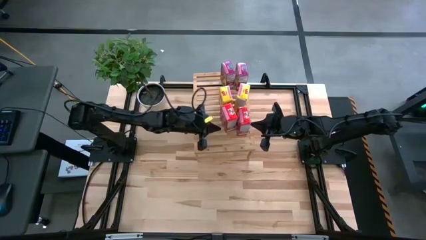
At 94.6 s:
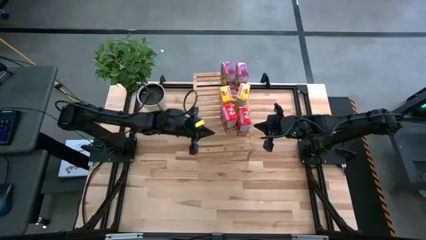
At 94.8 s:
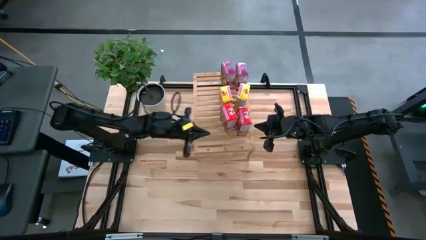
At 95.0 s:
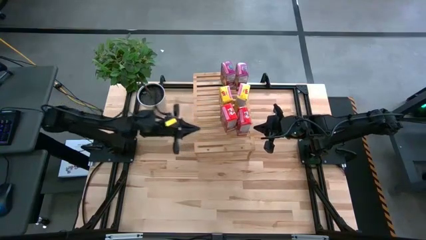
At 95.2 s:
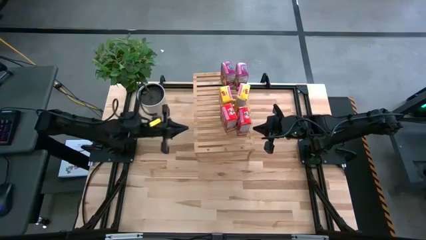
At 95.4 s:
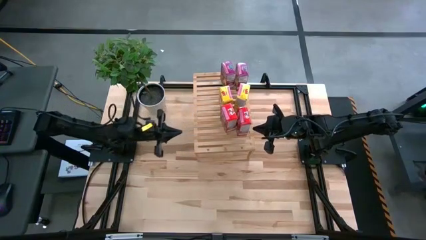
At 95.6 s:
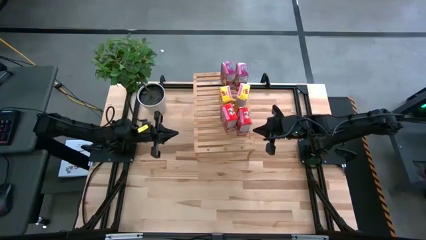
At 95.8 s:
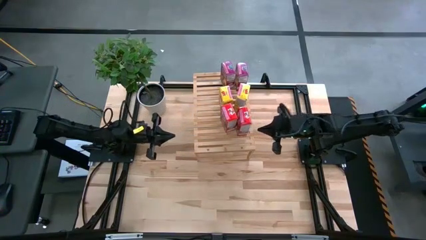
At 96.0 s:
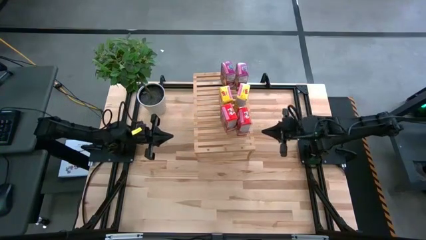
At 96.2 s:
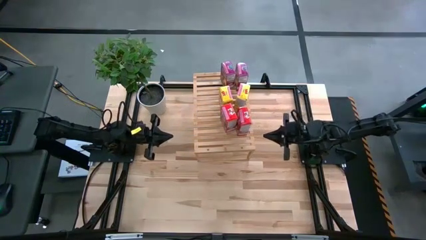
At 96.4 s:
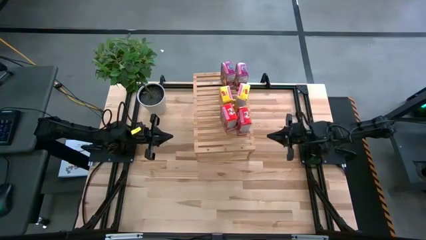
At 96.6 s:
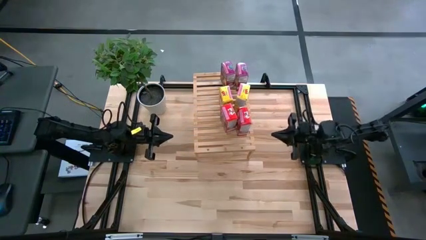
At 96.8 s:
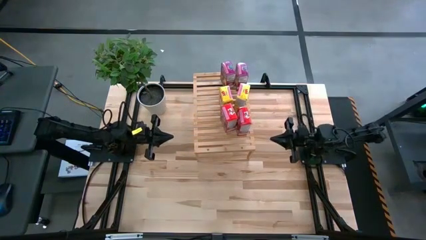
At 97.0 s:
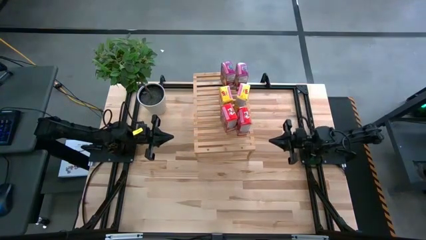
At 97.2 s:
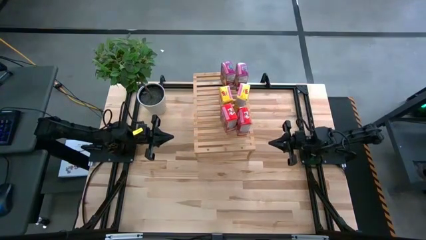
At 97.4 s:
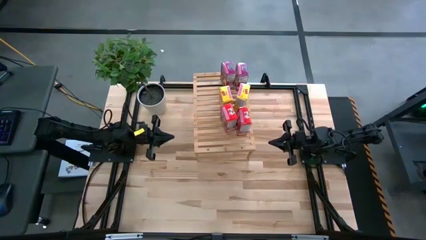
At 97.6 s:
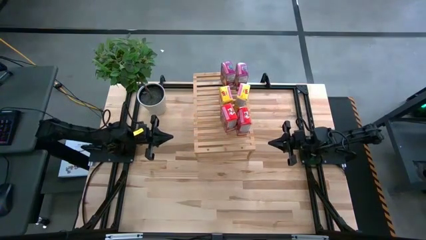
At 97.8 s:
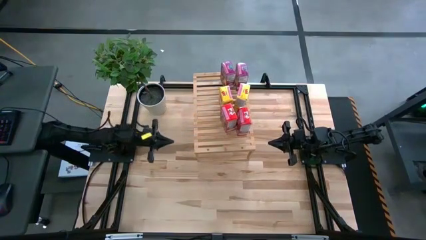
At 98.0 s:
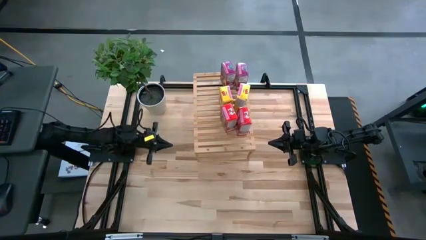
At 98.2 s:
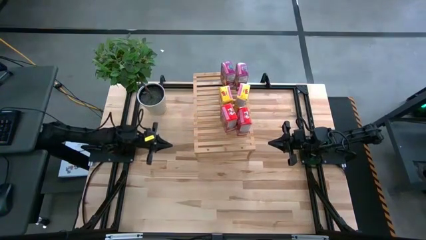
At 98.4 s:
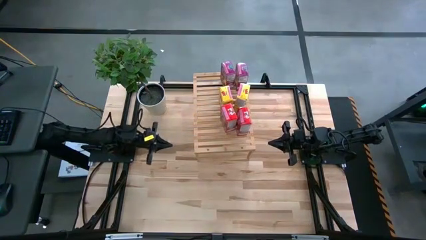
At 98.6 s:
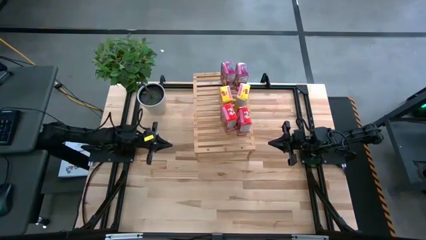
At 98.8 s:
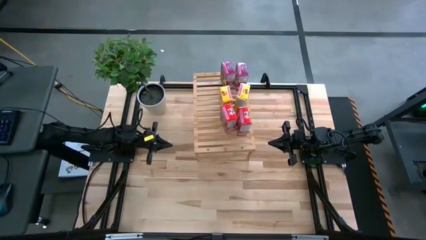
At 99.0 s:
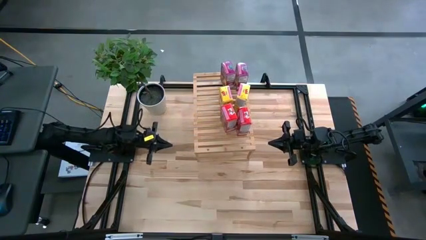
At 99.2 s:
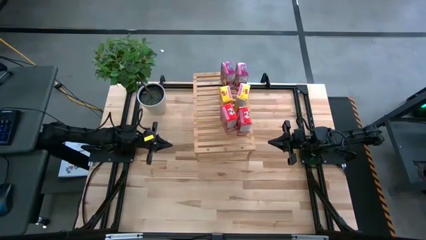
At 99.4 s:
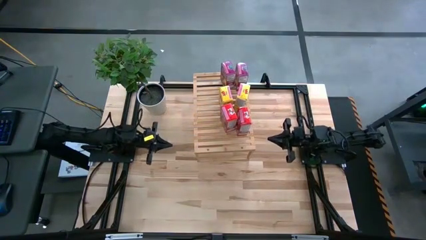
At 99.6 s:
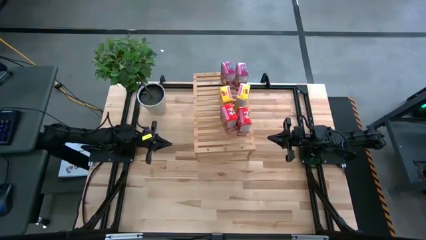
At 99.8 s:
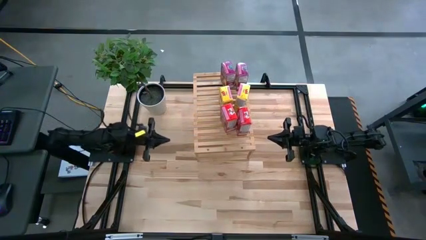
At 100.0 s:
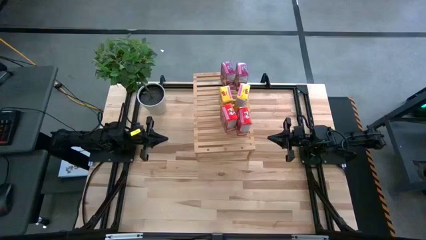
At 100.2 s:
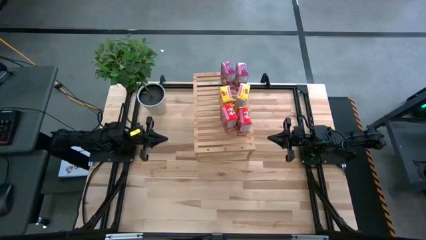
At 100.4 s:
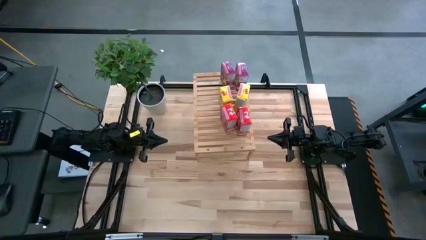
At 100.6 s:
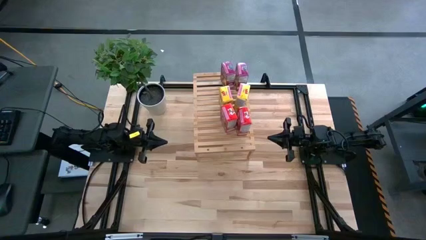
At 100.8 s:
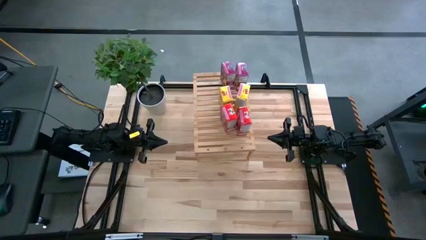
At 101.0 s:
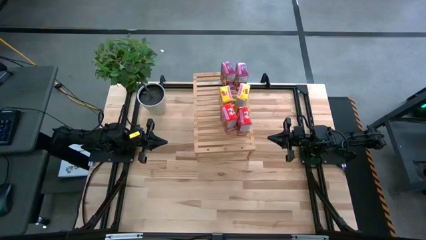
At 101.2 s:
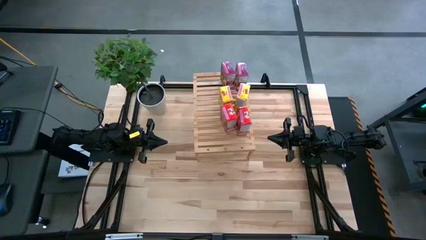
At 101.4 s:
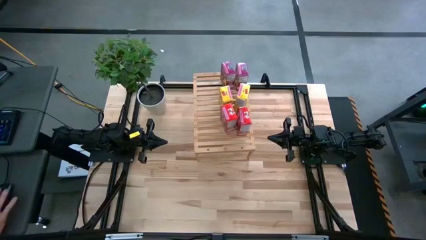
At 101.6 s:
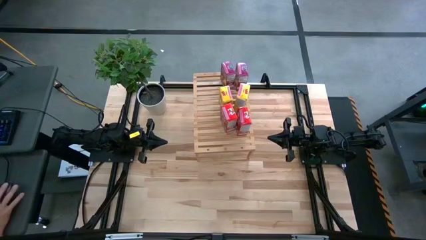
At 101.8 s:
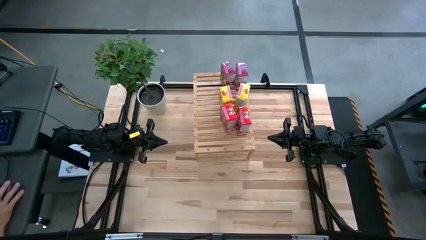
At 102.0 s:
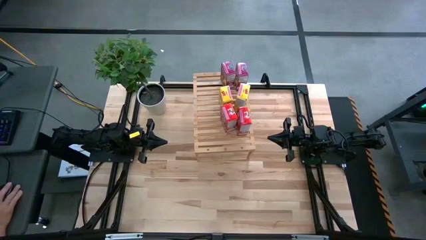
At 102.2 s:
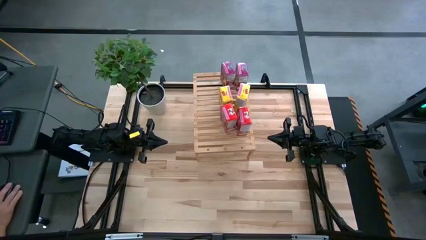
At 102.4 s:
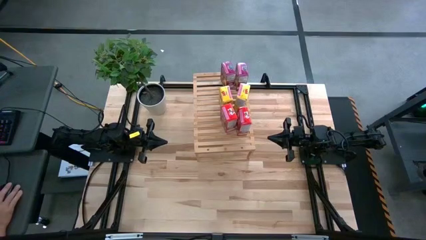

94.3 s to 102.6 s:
Task: Stack cereal on shelf
Return to Home Position

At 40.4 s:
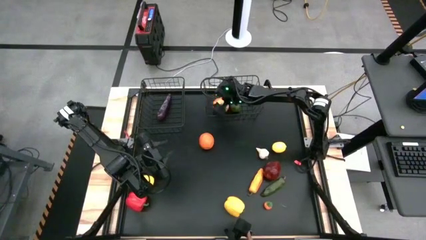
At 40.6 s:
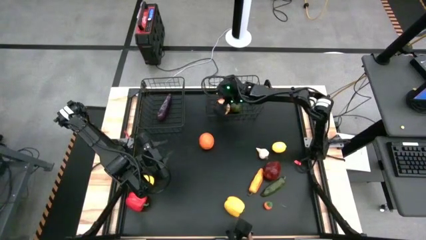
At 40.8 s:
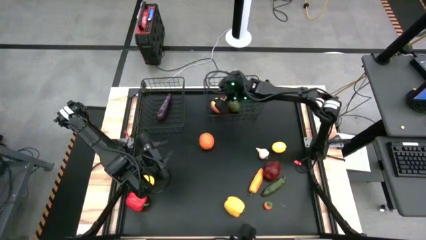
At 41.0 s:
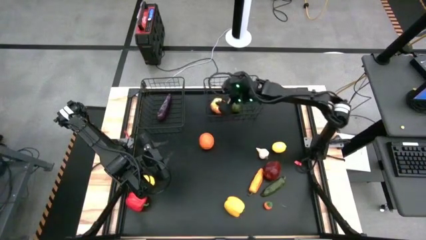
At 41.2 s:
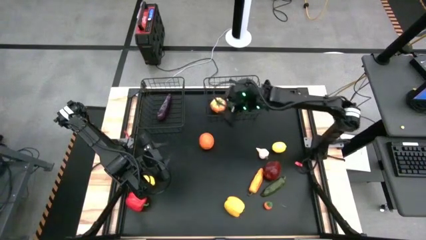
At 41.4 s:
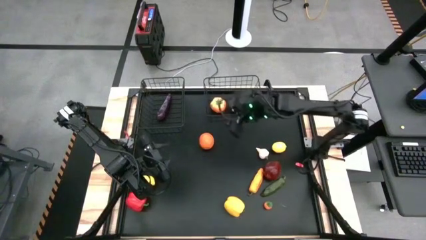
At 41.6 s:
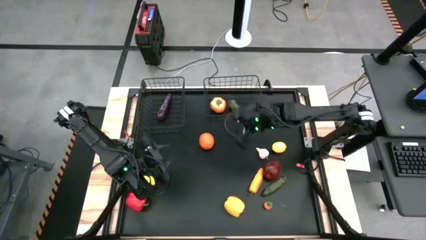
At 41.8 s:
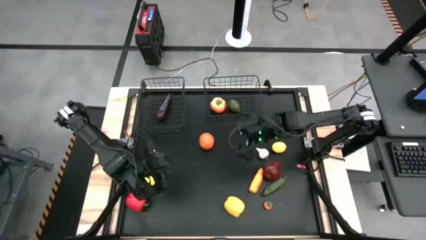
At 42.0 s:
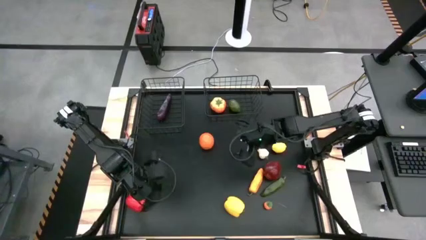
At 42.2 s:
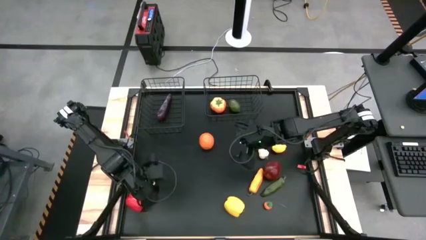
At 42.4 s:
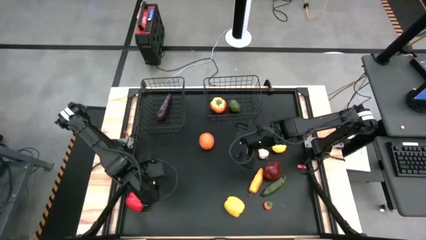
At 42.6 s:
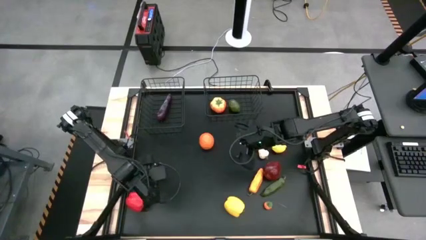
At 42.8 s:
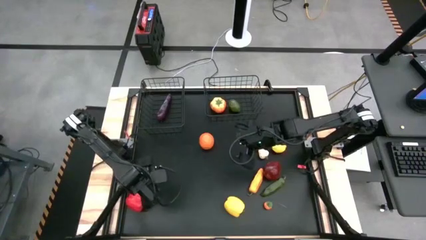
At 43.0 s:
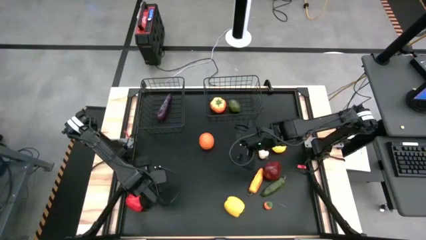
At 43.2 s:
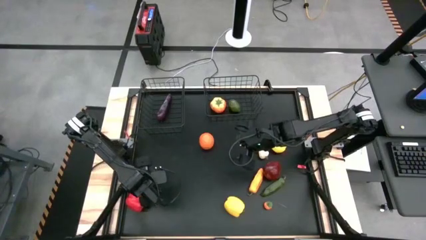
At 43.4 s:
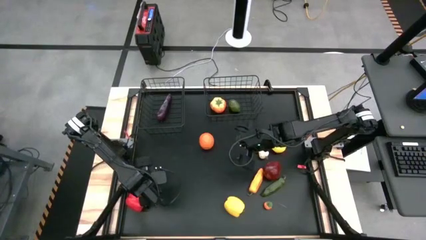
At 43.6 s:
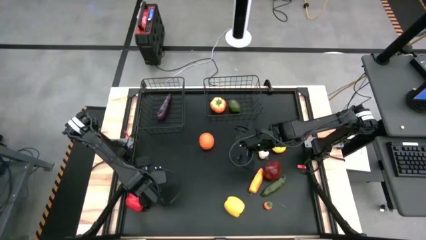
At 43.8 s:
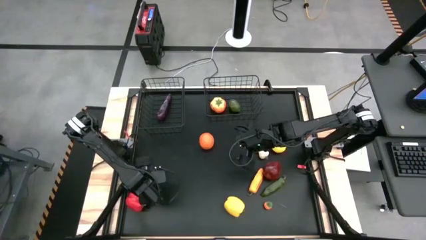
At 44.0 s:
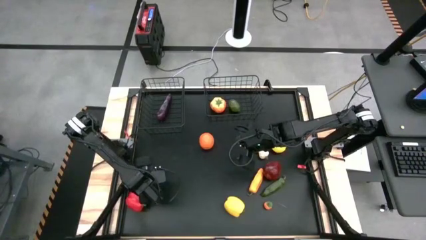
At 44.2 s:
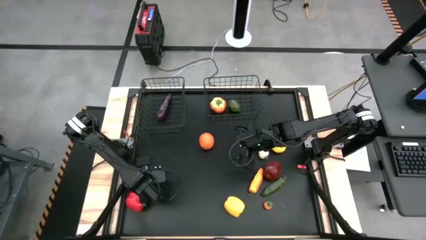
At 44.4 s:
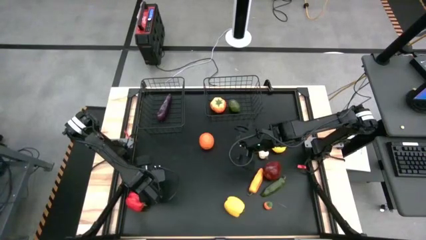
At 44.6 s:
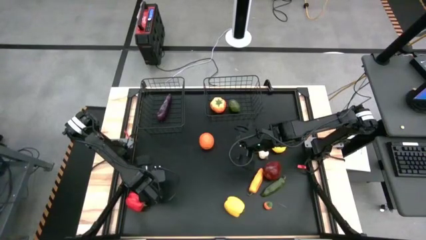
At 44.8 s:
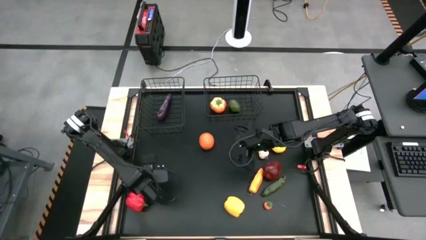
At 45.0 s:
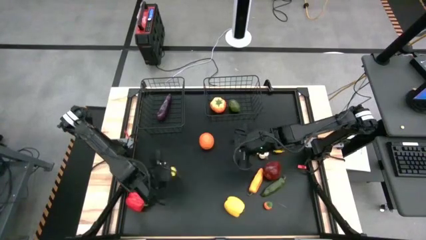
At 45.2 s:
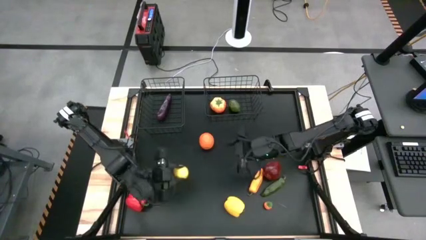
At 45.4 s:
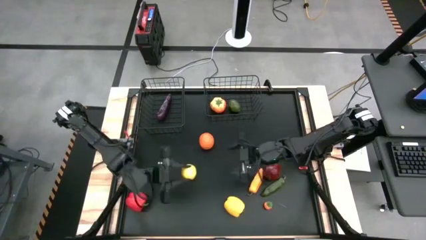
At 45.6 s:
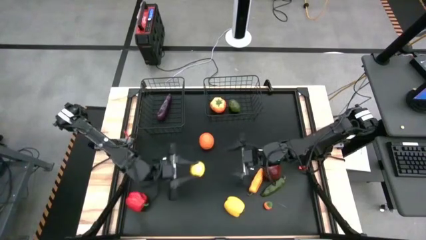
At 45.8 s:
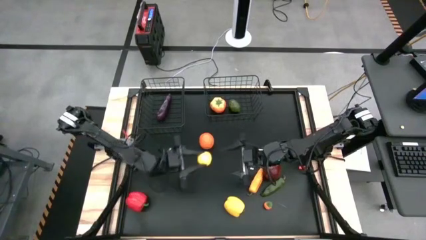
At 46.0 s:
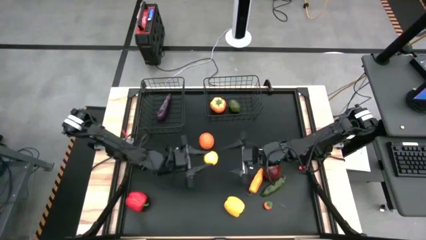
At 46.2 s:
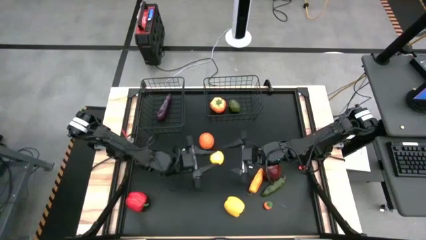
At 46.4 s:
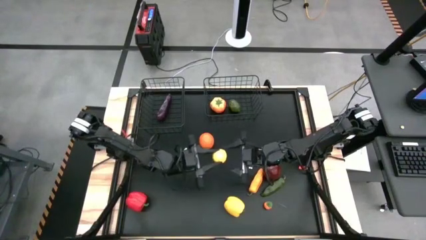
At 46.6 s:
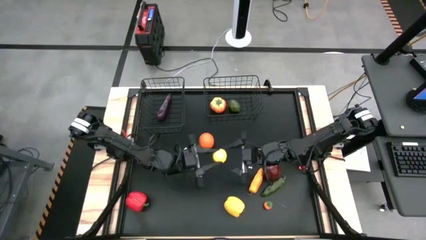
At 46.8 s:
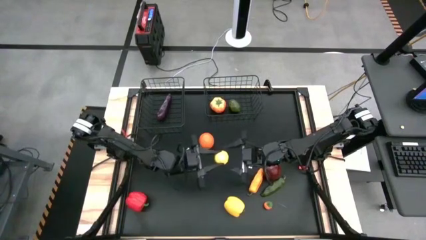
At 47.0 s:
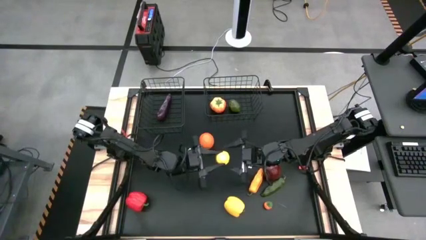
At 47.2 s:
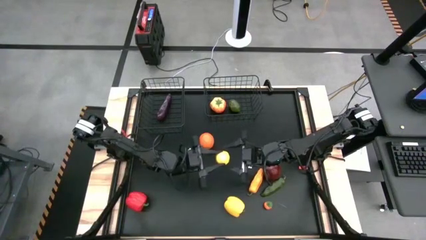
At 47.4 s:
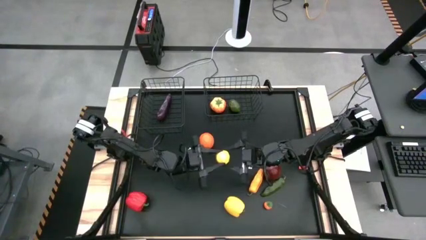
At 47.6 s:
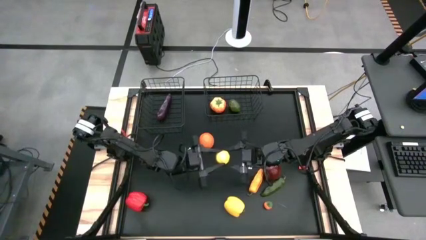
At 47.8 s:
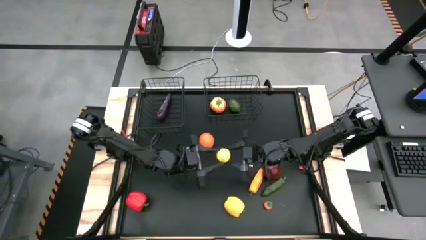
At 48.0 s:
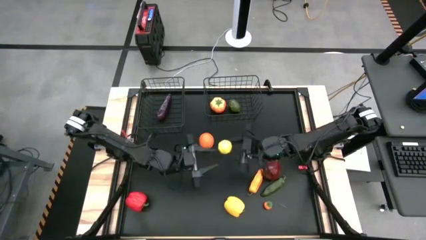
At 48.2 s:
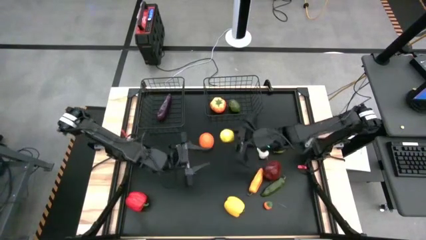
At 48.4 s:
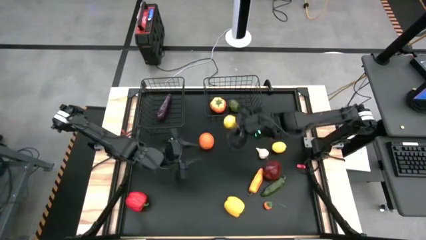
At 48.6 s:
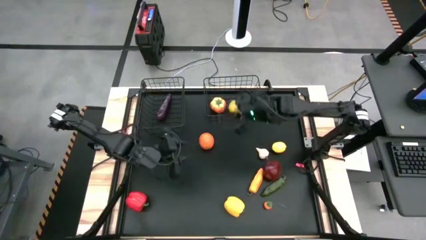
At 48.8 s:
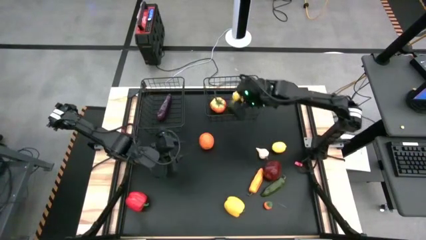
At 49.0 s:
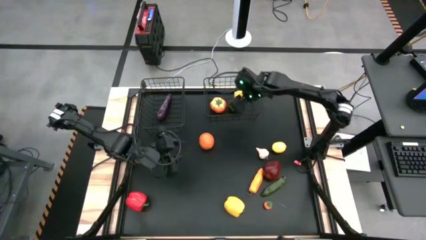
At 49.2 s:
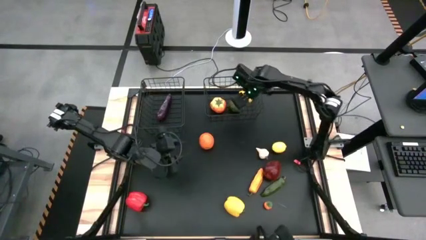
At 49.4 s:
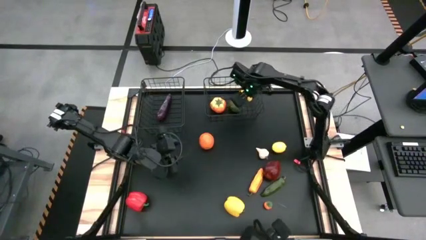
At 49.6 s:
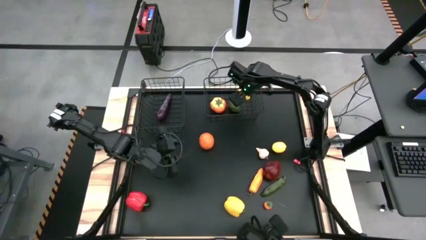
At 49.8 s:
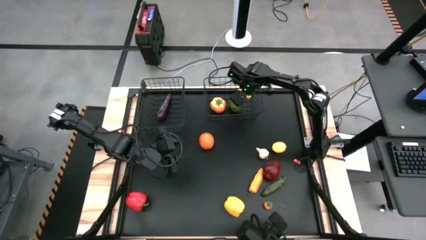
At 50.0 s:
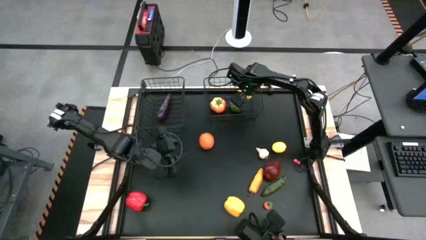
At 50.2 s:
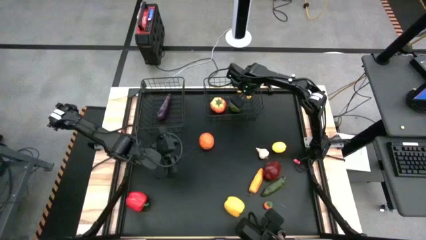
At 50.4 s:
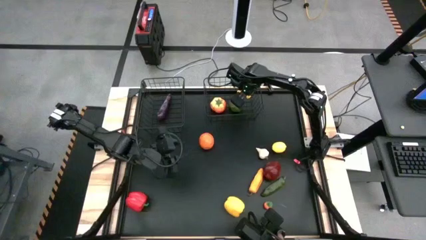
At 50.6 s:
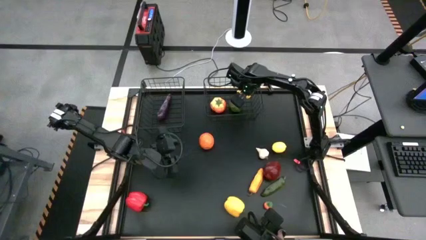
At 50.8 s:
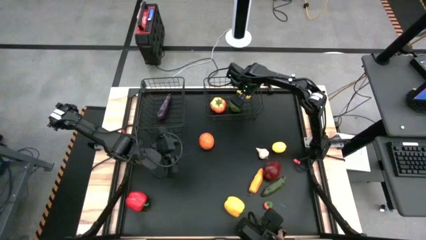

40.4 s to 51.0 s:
Task: Sort produce into baskets
Put the left yellow lemon into the right black wire basket
